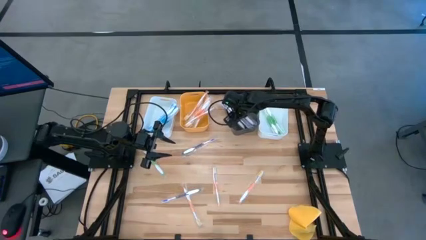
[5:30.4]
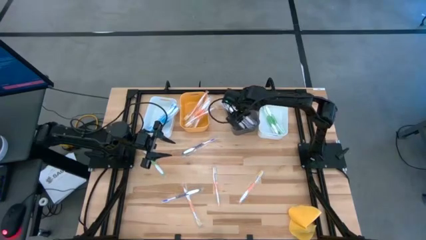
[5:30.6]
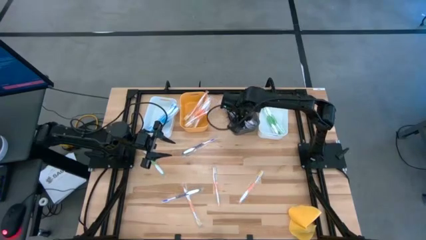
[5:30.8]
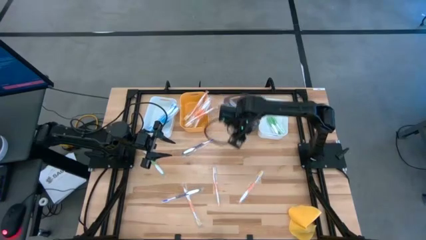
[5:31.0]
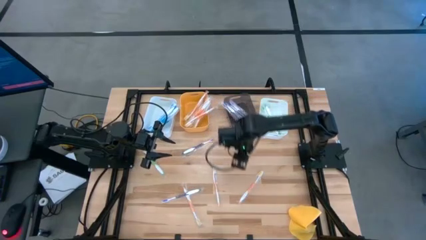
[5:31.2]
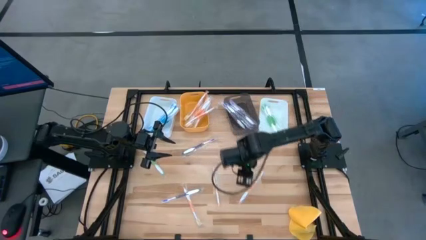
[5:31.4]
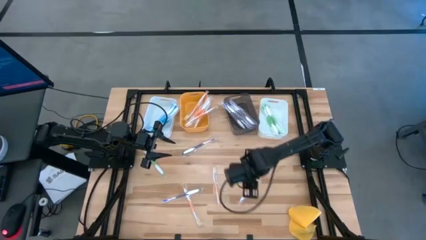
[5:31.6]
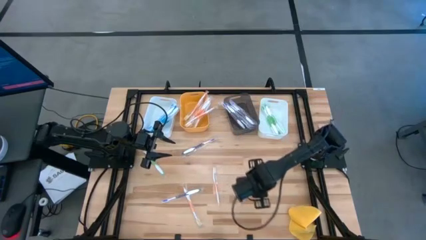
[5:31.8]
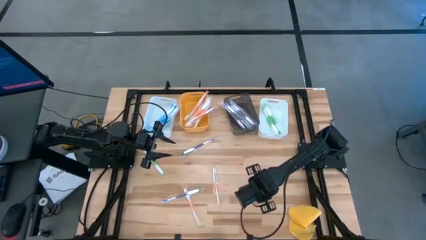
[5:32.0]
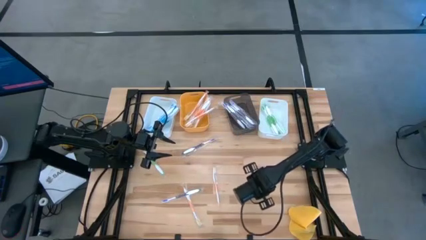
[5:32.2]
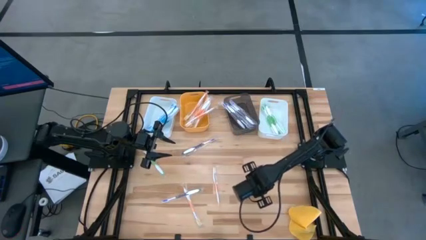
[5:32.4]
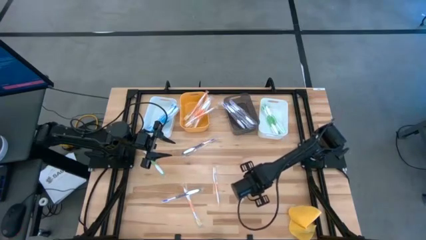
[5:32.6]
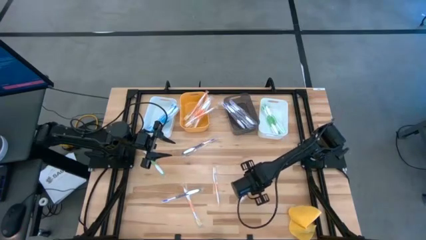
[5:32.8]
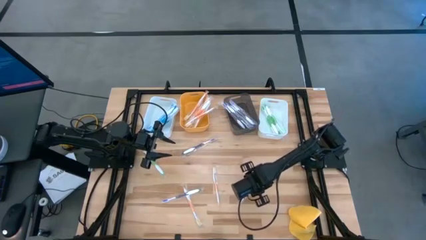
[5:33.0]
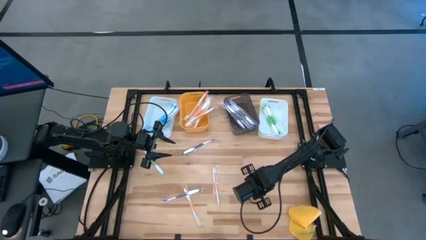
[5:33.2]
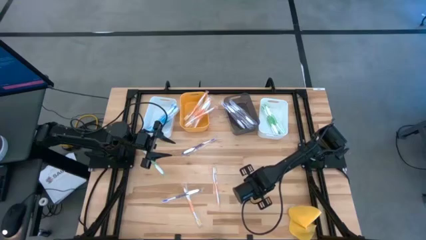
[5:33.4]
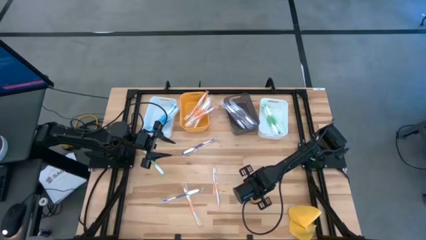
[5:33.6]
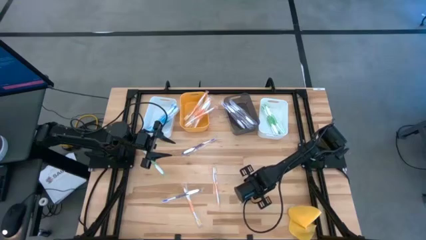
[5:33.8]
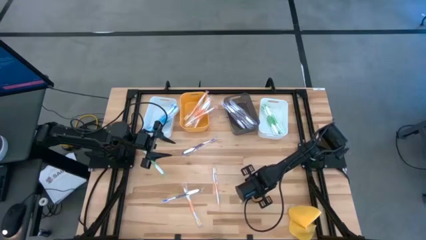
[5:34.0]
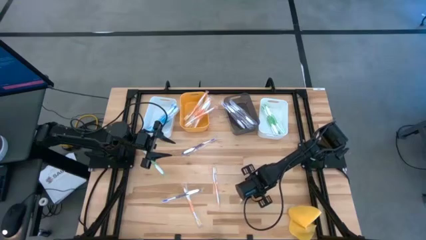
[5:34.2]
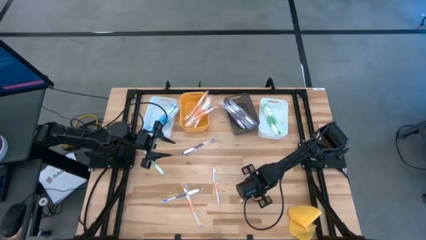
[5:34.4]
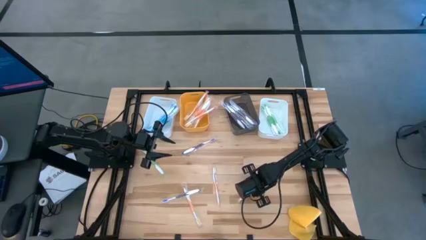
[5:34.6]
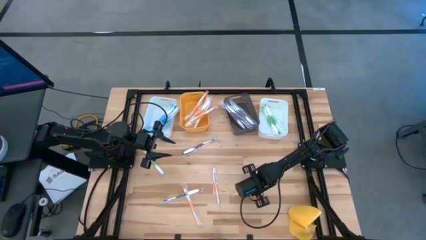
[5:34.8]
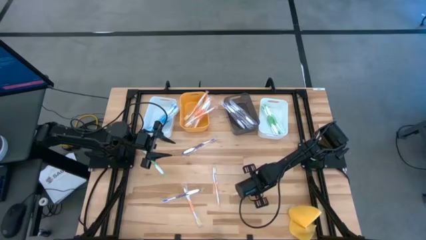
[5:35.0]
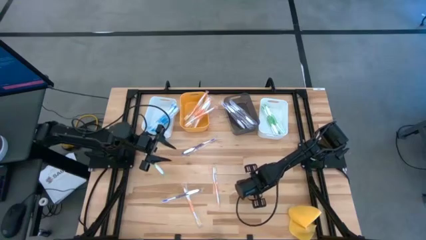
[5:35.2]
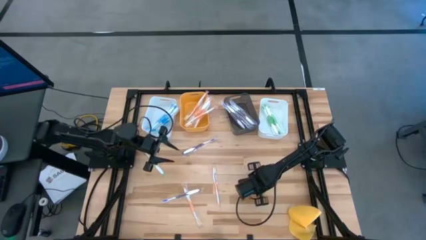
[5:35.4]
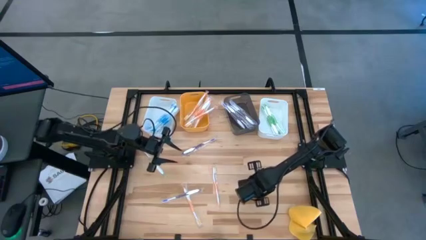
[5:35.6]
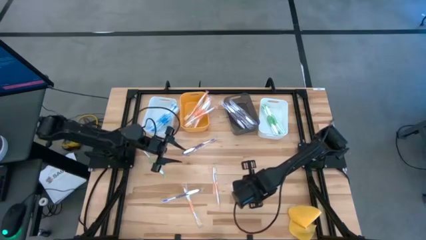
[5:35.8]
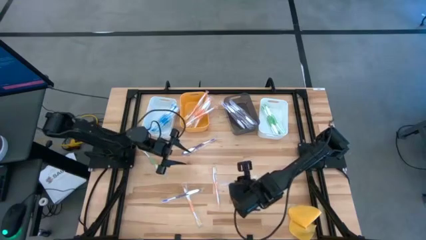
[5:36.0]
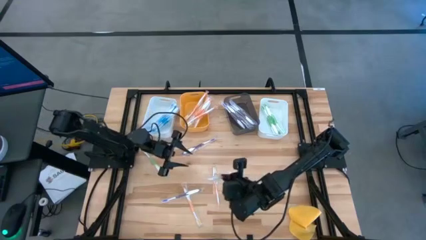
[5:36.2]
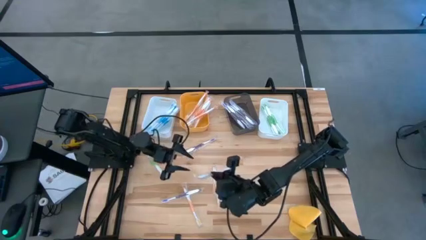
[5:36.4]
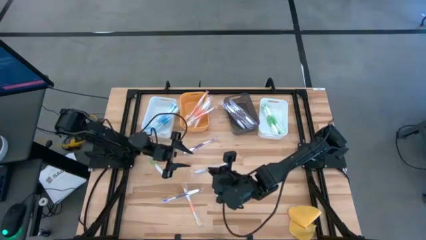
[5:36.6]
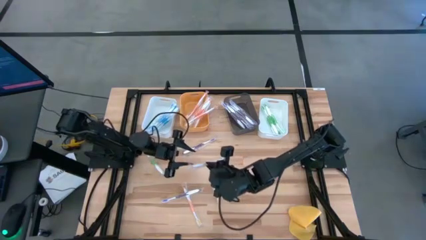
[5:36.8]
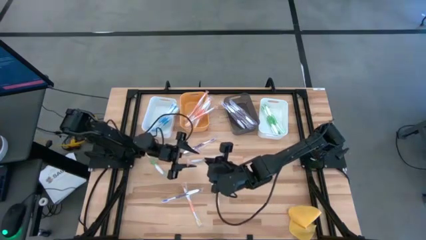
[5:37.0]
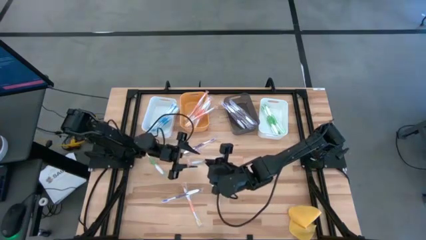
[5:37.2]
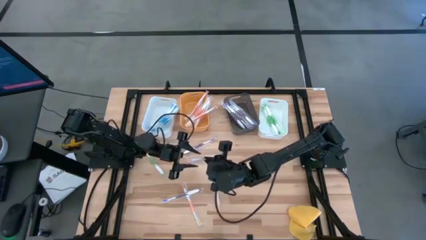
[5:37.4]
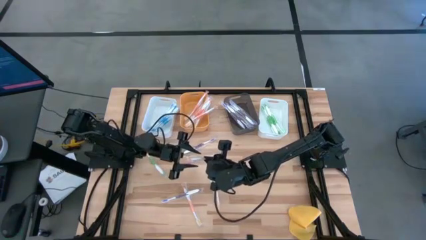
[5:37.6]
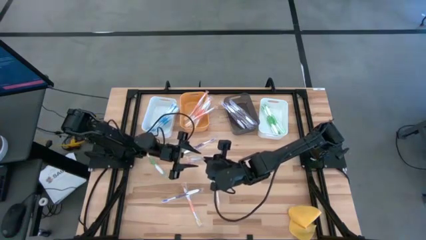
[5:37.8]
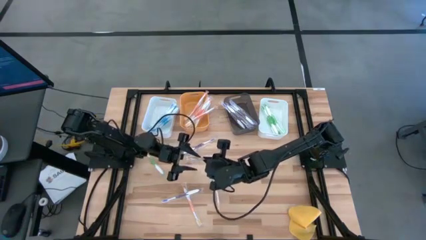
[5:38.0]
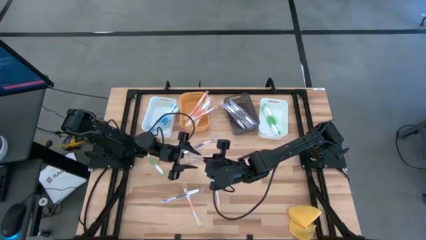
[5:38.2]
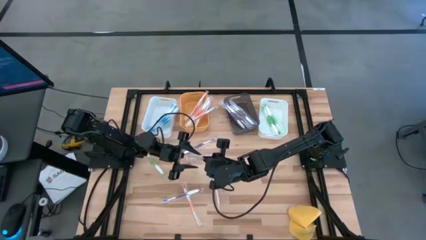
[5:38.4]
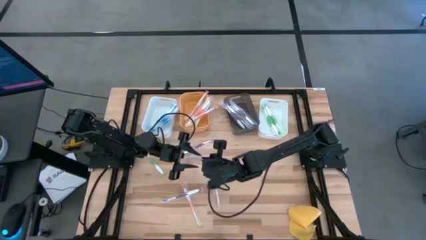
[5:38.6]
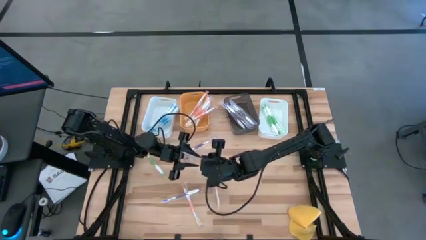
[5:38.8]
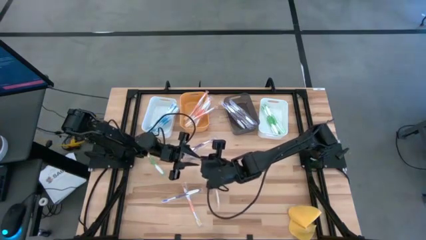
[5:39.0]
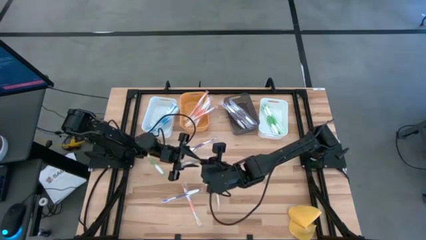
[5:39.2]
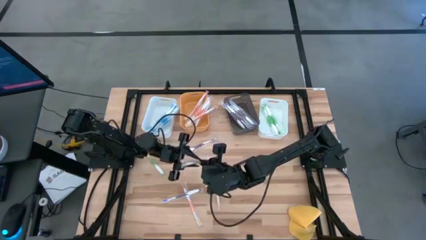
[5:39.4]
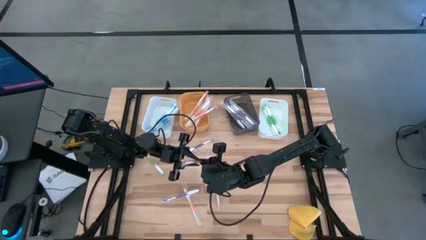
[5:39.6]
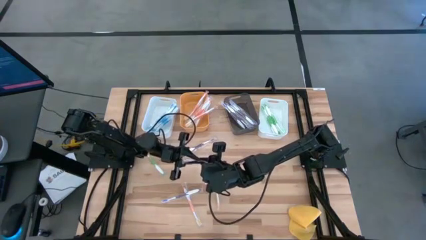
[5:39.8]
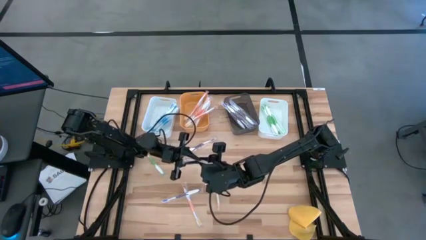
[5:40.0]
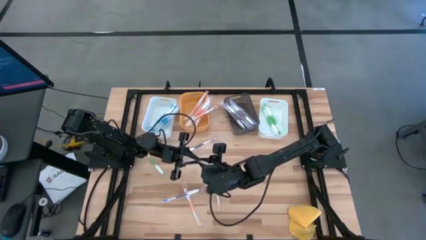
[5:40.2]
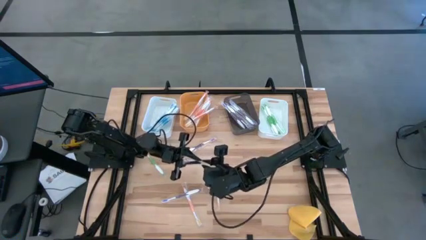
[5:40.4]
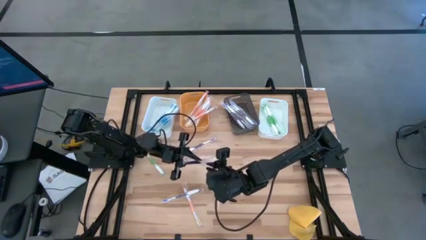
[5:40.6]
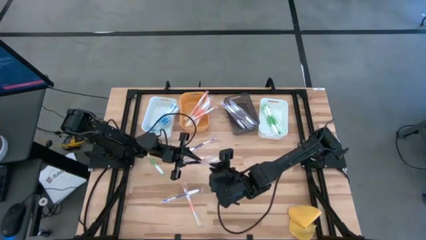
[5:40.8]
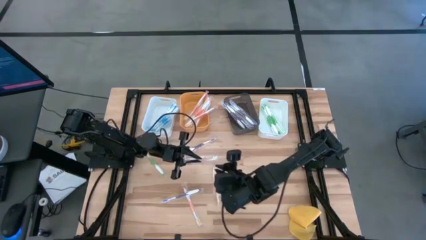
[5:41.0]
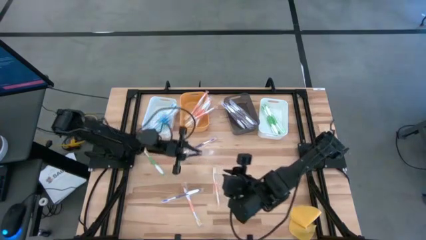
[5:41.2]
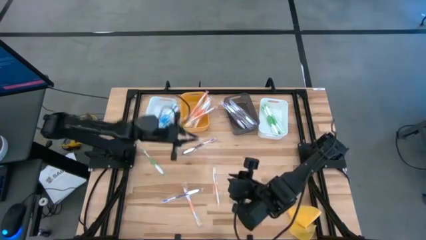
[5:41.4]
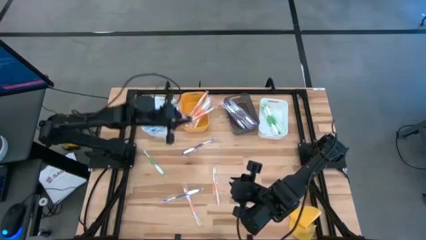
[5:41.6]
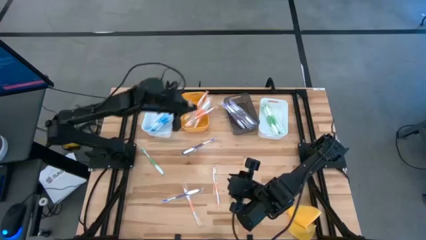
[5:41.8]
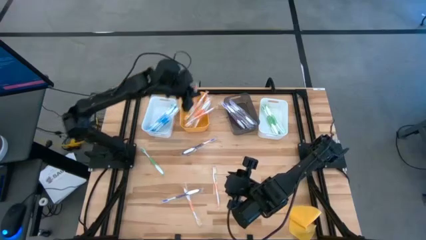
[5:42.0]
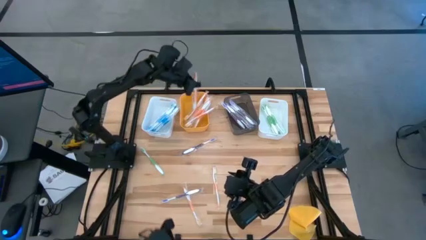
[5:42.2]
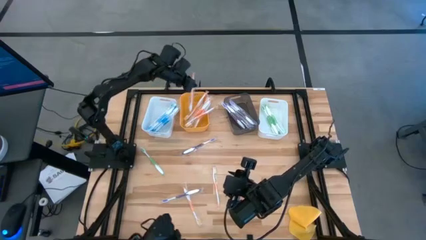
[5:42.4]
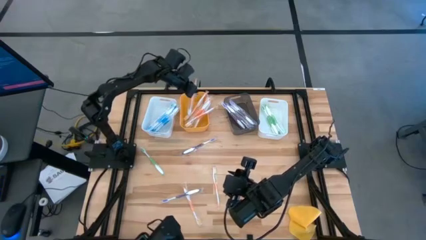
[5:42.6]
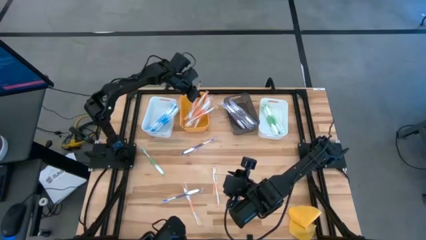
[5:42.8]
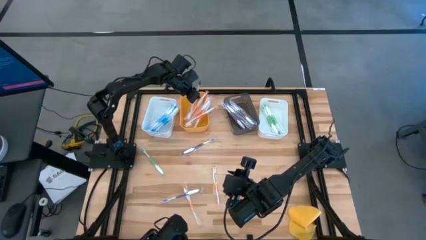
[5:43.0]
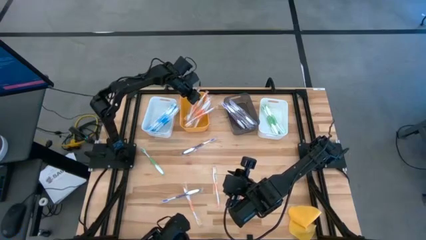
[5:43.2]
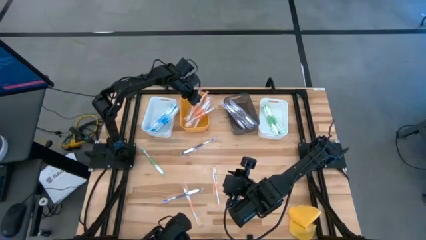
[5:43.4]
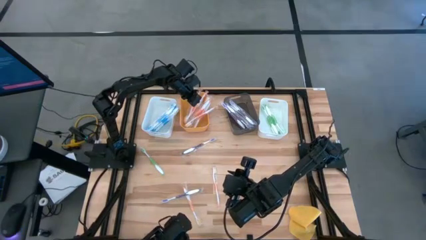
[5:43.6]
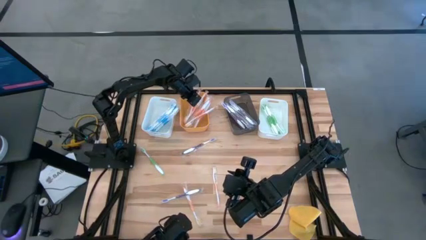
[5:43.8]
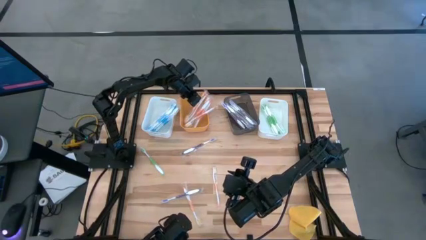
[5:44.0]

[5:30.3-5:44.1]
Task: Pick & Place Toothbrushes
Put the orange toothbrush into the yellow bin

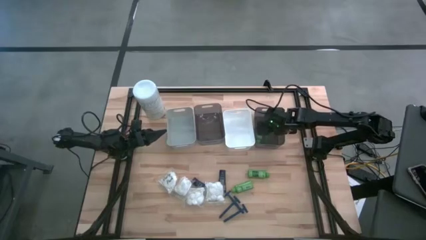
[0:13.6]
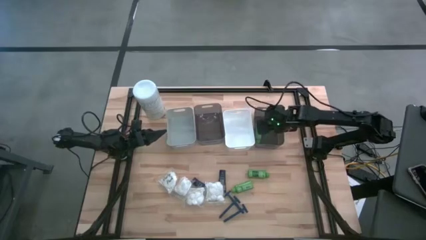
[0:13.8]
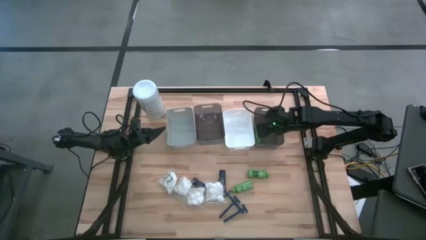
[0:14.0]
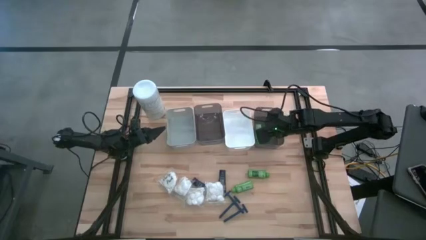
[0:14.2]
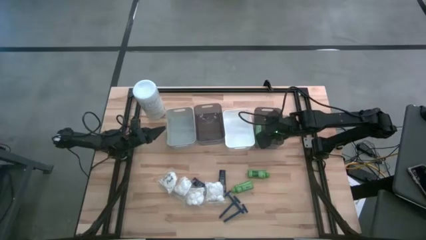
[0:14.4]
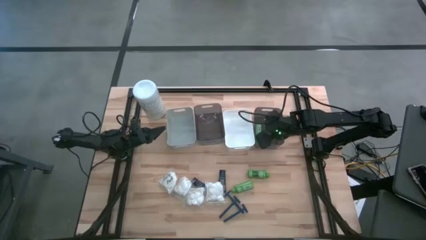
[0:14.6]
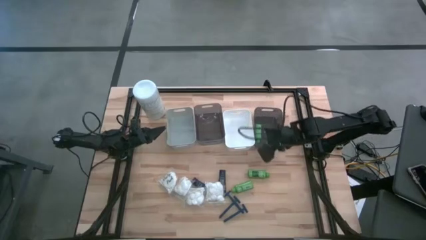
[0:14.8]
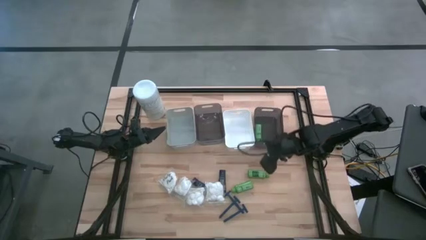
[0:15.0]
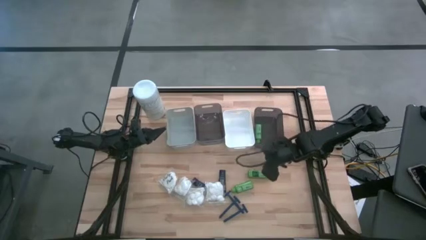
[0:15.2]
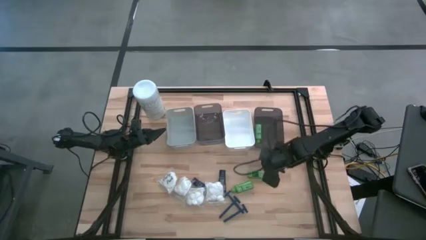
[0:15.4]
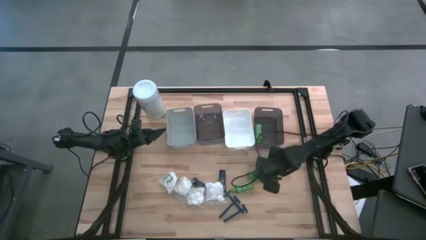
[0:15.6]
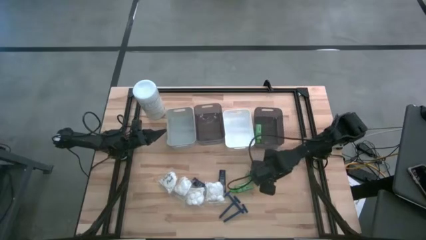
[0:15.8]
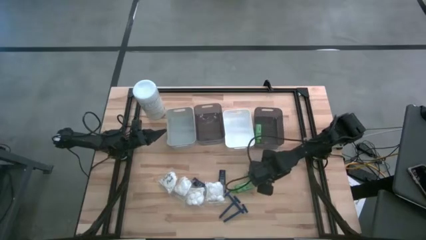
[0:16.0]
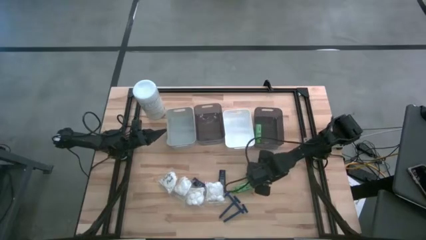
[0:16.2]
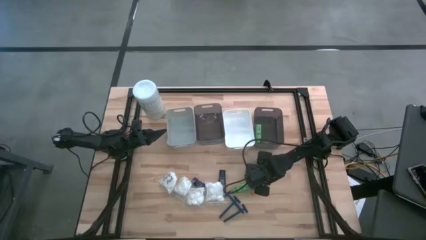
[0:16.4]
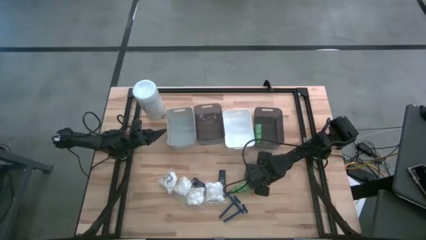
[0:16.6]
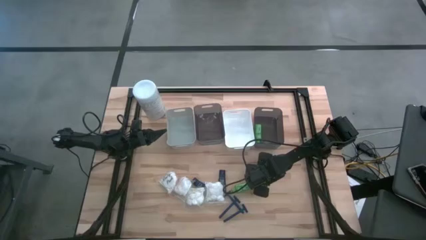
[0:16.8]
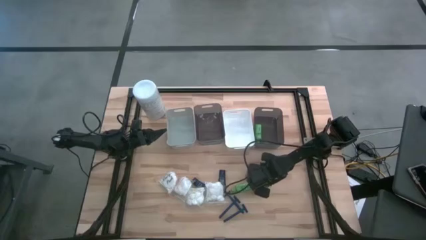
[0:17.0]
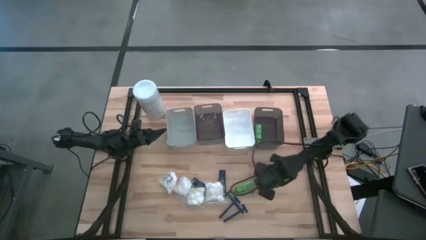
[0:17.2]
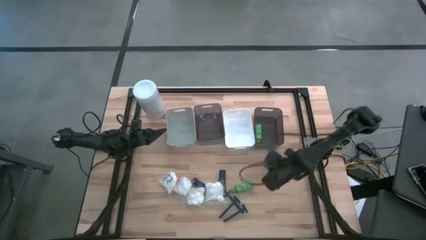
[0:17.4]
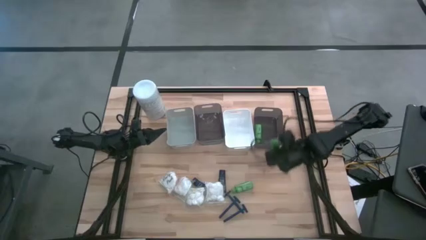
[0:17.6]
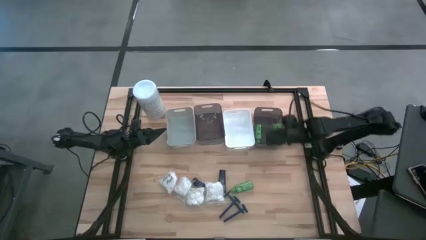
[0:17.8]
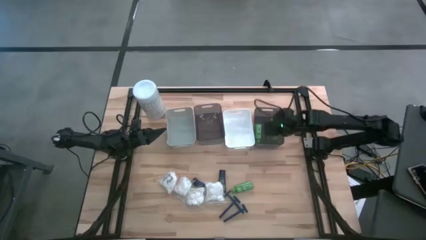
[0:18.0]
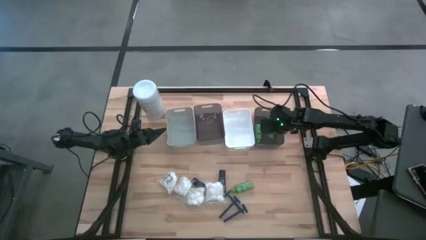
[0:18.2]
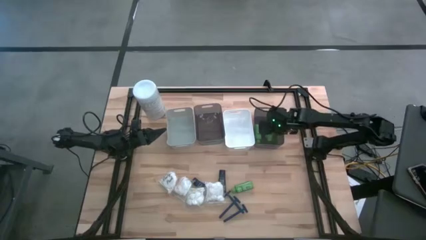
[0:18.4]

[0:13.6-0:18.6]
Task: Pick & Place Travel size toiletries
Put the right shampoo in the right black bin
